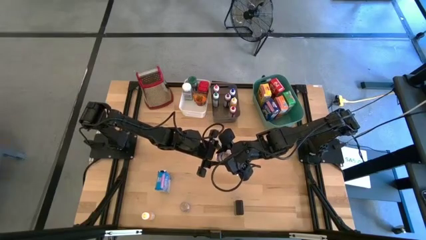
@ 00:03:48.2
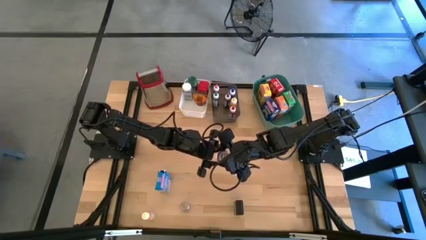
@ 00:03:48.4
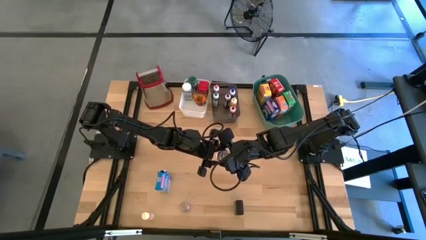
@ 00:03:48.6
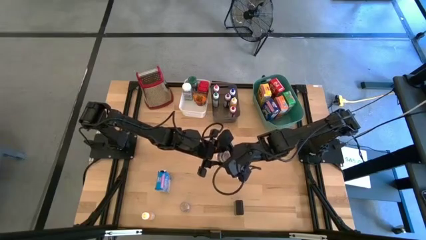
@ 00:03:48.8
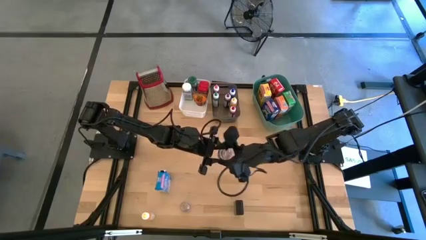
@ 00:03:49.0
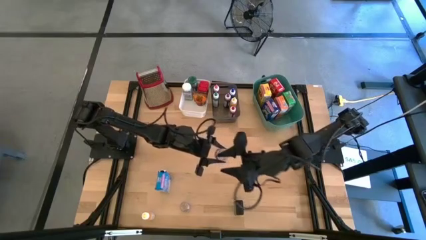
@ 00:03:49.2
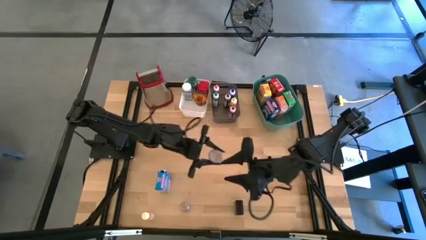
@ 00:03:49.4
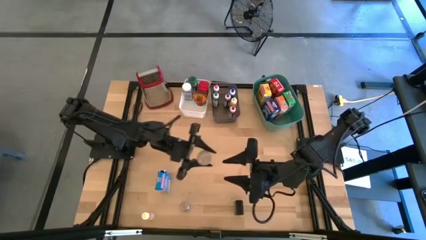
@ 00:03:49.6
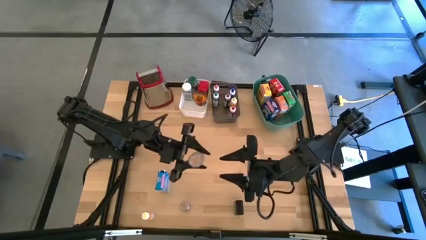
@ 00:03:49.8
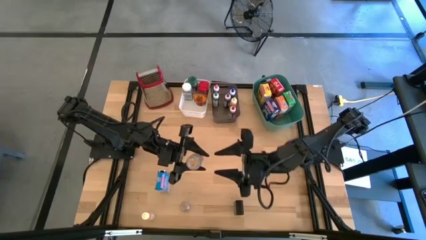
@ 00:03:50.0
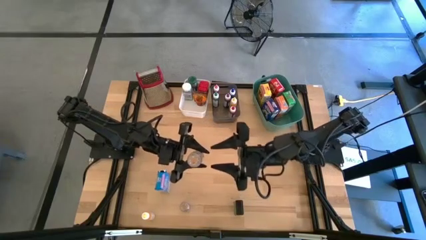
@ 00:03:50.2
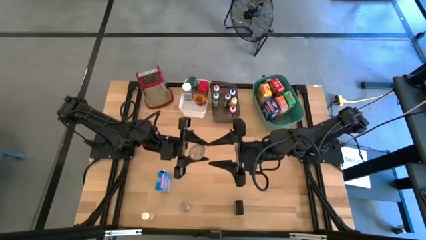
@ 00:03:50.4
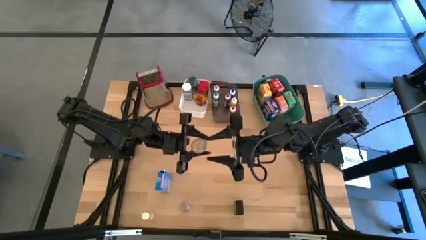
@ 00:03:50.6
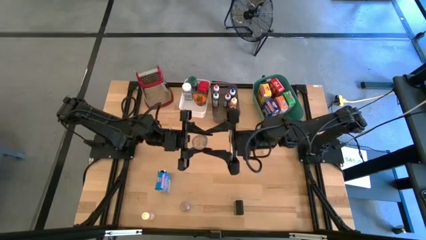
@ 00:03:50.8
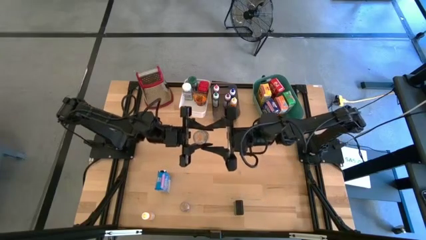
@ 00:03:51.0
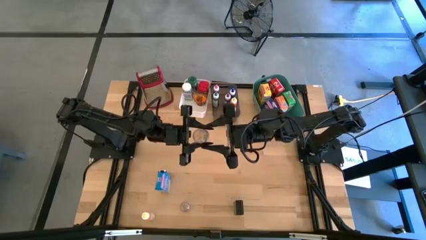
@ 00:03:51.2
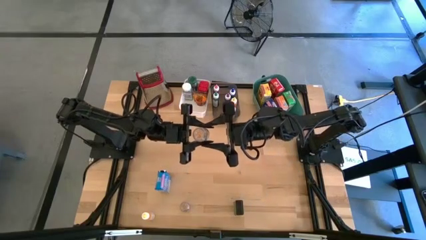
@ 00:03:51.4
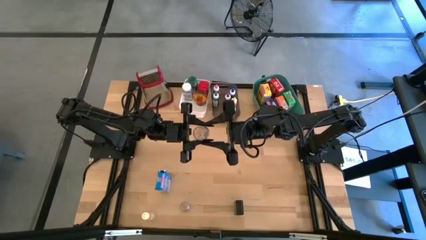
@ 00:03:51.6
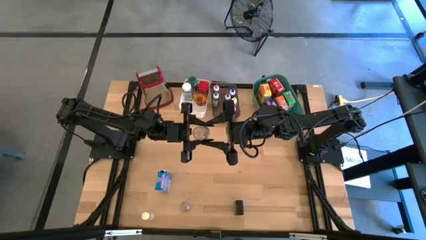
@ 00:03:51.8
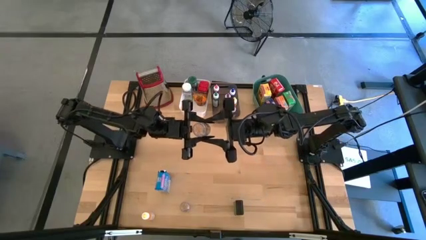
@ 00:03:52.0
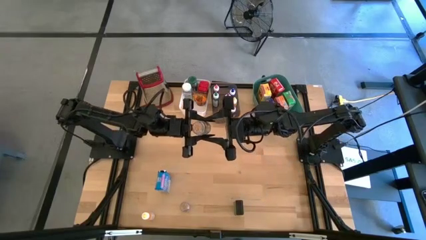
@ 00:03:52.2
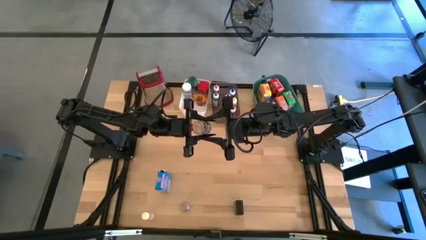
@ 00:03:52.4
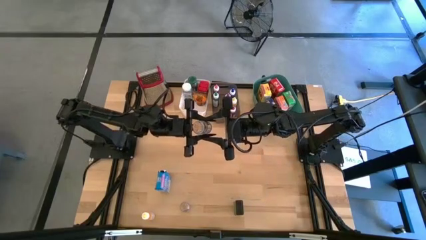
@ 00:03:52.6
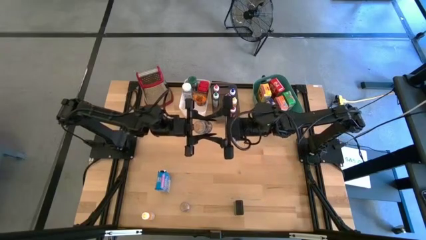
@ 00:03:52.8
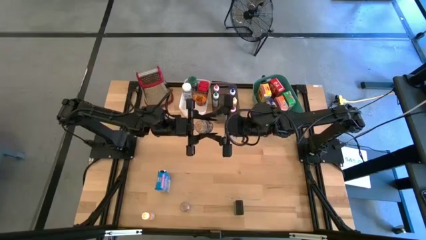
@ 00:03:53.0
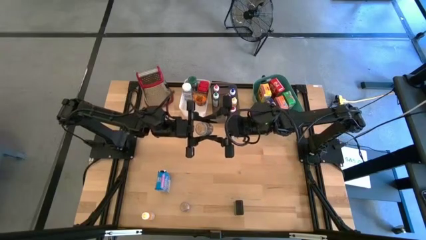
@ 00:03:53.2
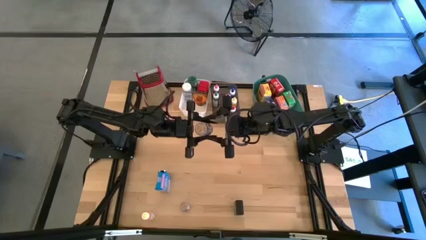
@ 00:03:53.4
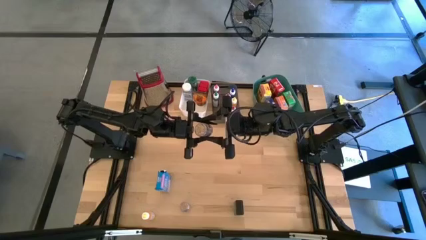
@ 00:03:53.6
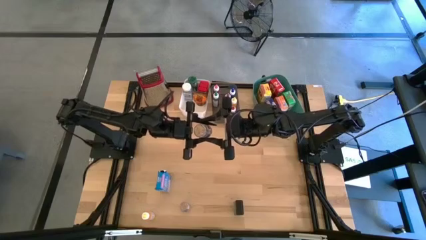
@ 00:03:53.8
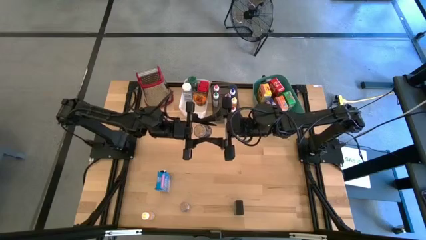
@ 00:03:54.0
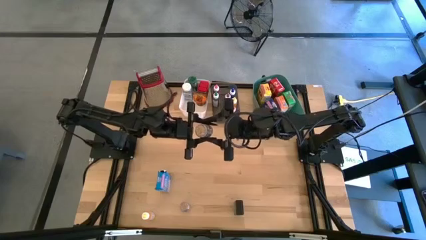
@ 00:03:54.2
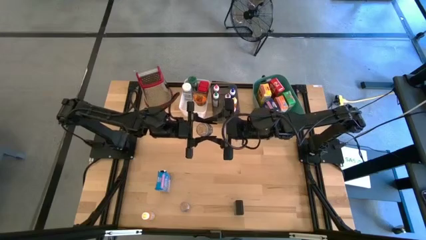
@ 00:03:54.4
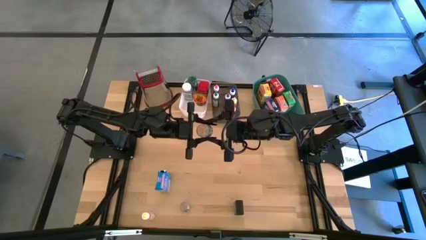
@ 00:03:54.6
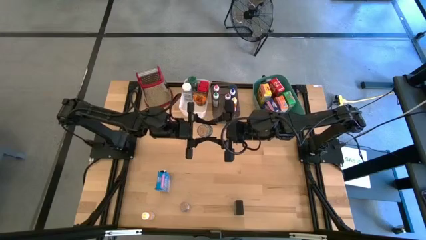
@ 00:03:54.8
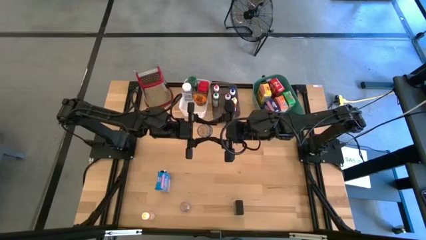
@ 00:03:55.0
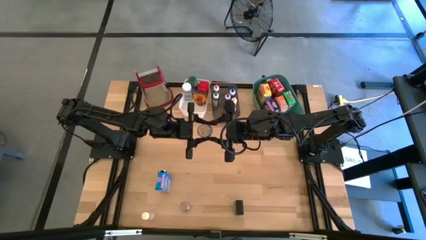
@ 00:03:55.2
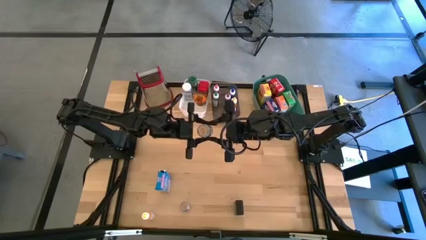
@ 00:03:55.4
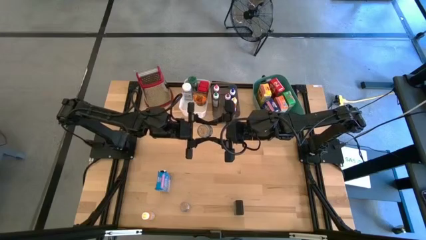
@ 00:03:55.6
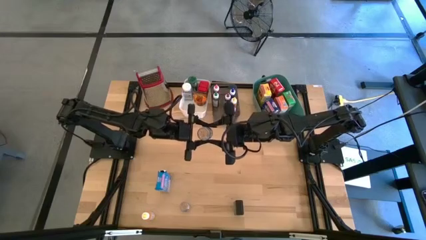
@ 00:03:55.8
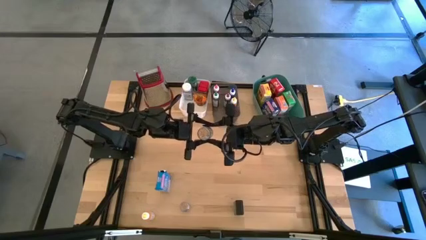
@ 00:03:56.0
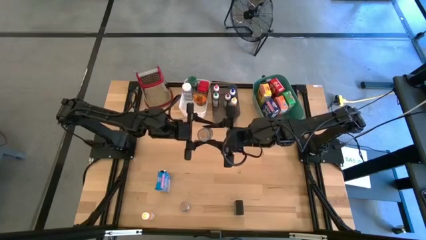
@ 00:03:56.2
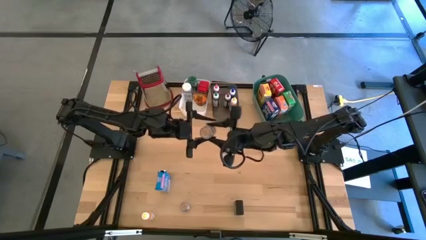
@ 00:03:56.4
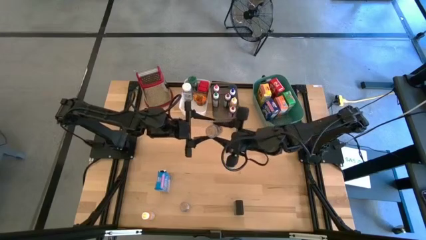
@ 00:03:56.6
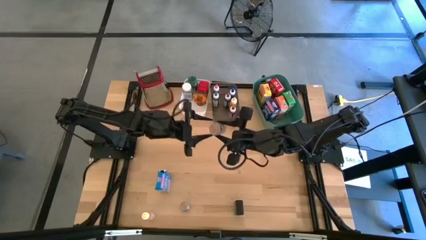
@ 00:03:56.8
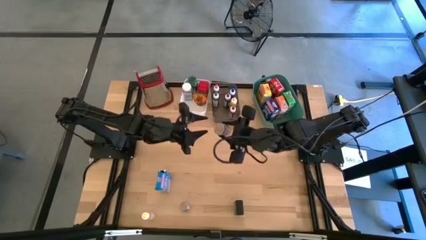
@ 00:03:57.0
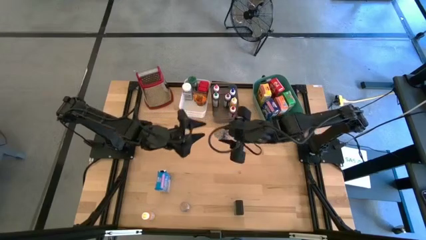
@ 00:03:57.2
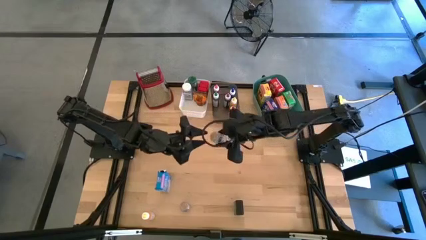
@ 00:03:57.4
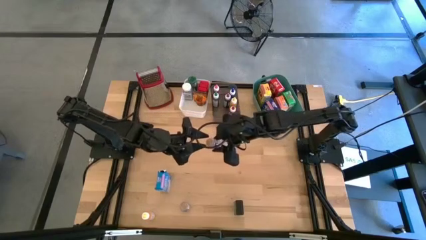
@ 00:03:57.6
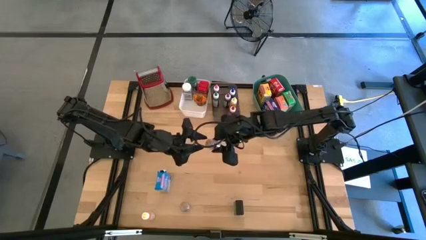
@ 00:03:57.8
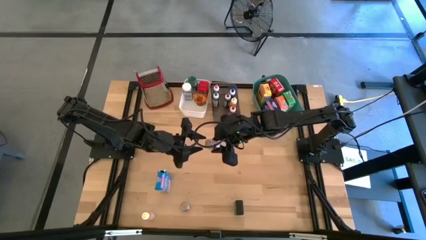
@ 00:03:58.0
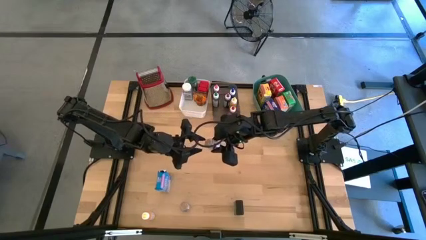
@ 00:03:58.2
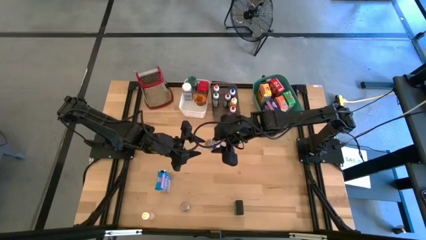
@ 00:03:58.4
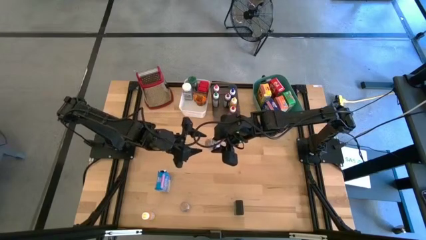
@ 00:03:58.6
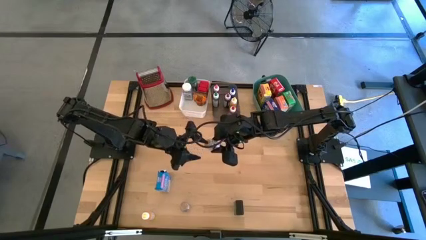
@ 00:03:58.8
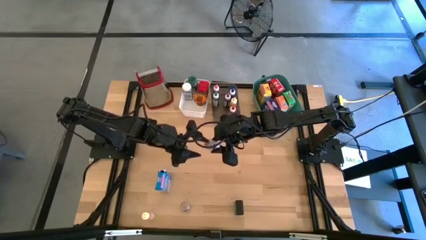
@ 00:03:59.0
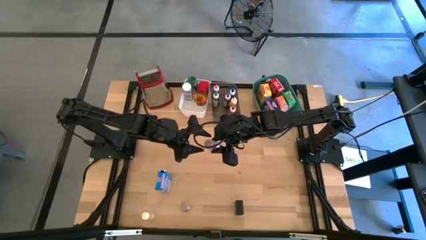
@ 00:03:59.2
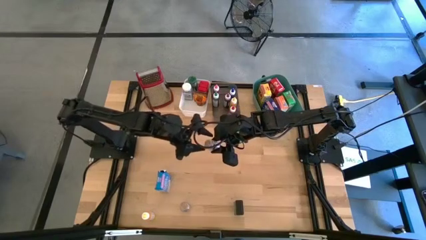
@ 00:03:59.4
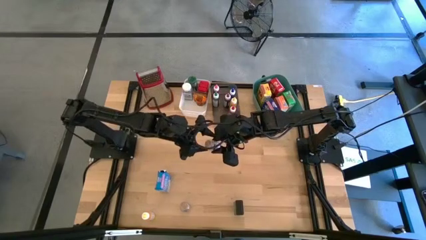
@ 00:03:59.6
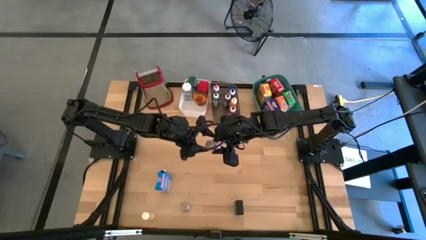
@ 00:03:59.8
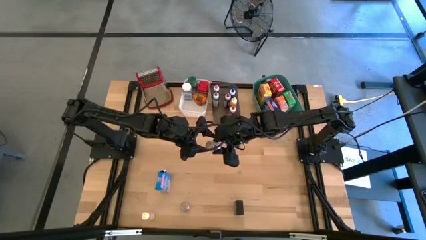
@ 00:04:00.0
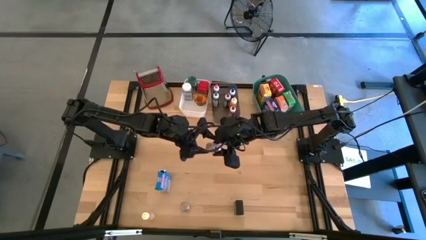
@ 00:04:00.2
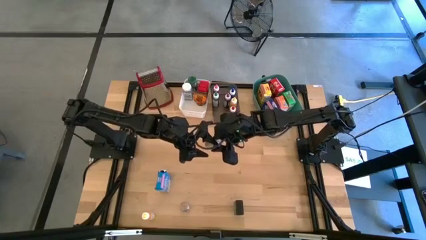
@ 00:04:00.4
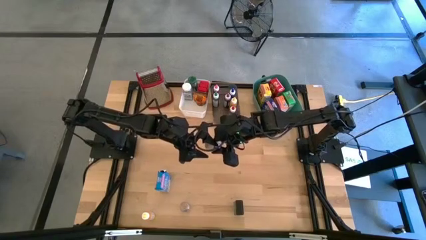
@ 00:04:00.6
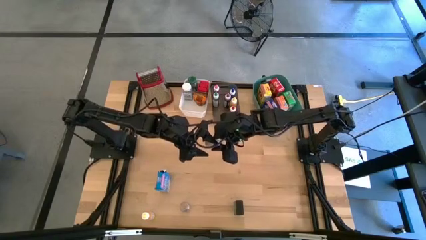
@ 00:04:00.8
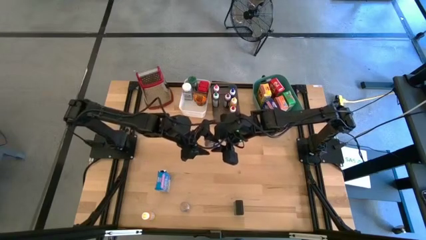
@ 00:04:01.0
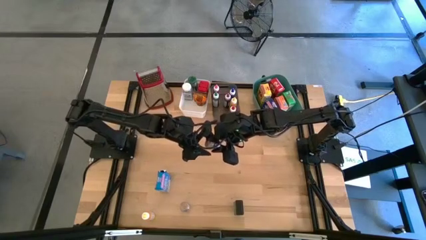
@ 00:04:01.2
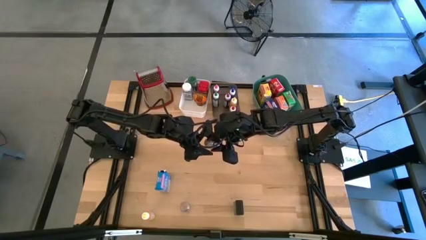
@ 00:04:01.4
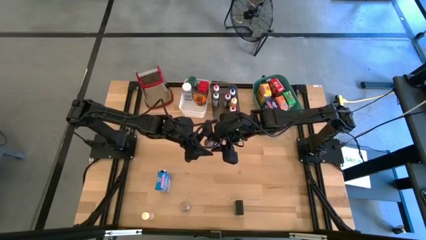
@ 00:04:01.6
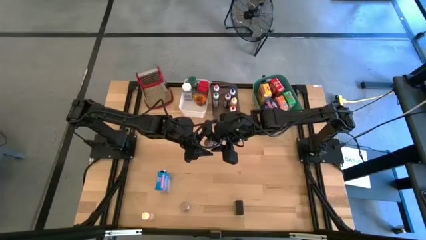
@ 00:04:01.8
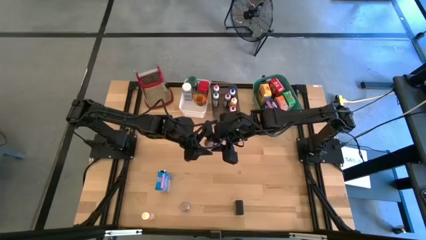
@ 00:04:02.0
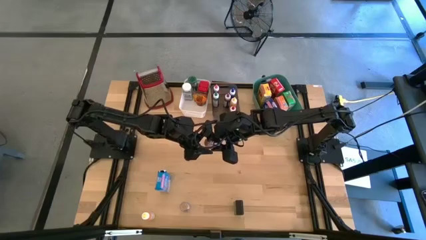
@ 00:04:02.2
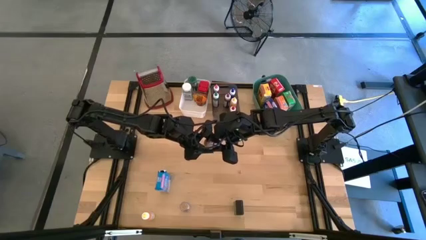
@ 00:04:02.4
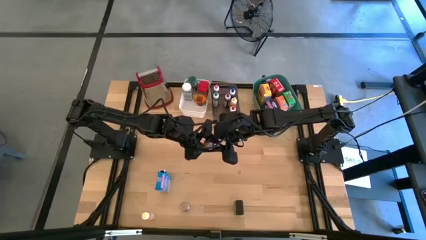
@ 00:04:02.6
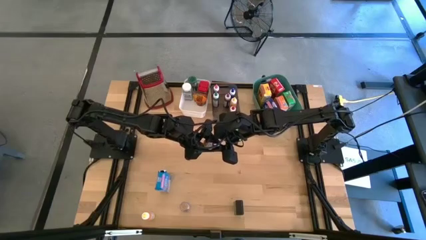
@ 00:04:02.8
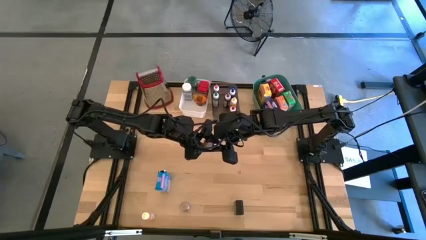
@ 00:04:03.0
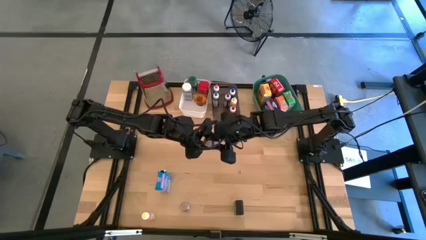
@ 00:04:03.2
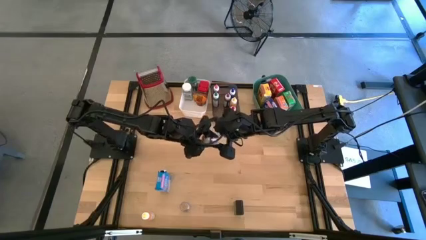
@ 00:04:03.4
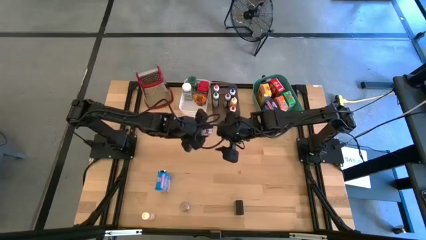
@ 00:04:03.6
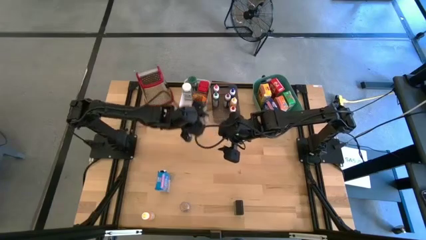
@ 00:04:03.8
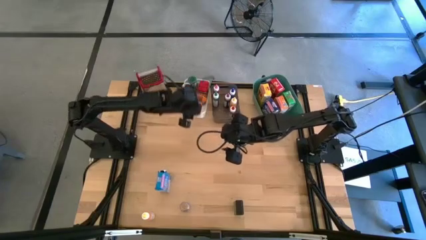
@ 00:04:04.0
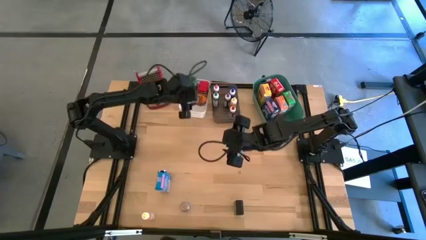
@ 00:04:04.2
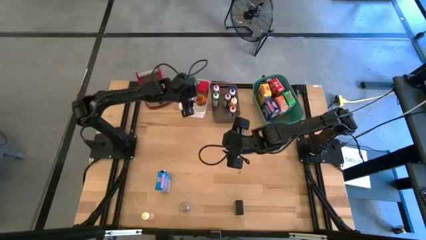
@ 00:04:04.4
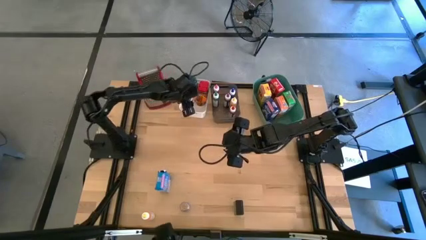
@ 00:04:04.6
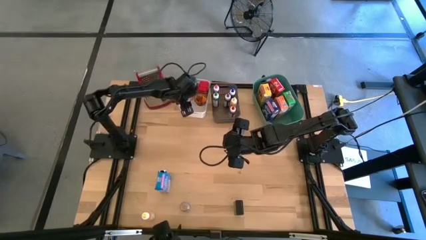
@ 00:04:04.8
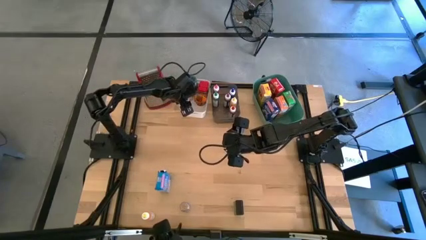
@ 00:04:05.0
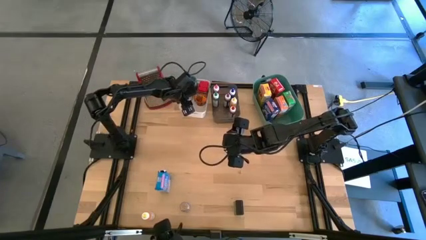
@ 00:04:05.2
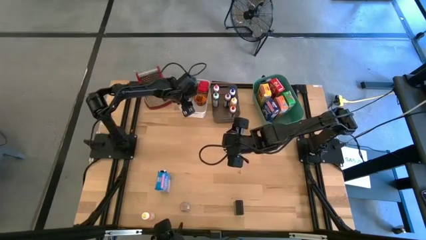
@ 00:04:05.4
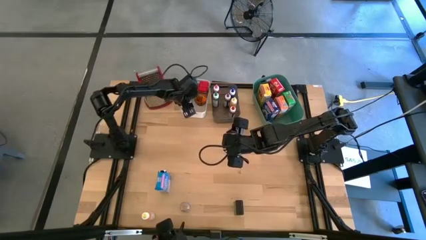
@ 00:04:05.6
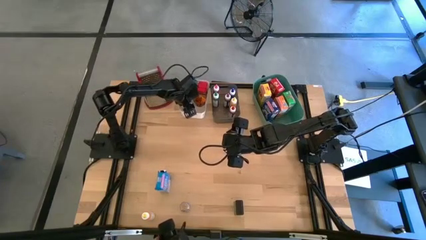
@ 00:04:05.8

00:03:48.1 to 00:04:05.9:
Task: Pick & Place Kitchen Items
Put the top brown seasoning bottle into the white bin
